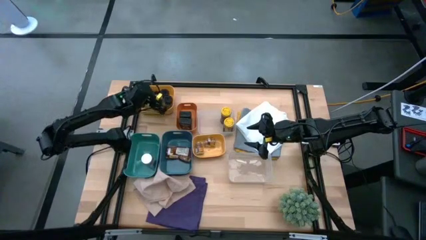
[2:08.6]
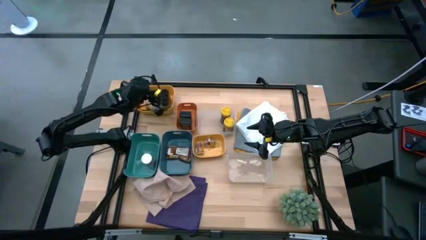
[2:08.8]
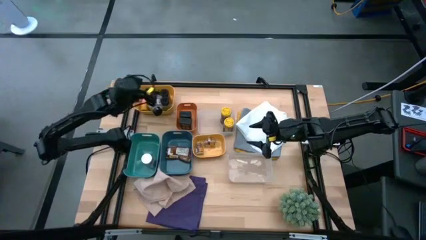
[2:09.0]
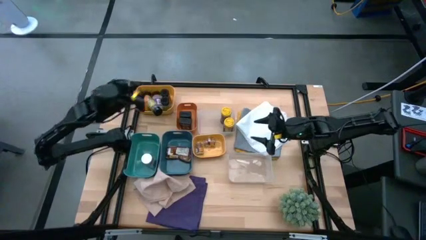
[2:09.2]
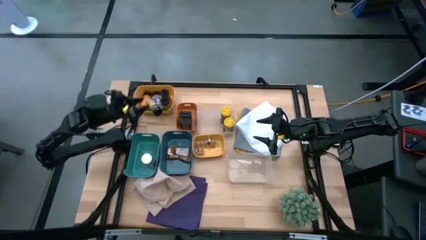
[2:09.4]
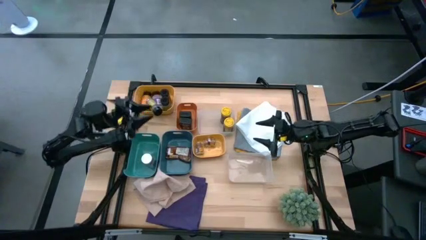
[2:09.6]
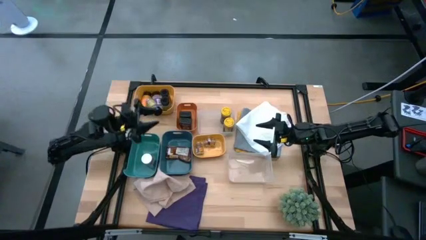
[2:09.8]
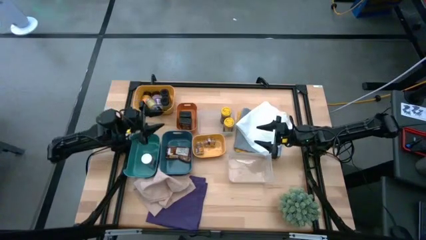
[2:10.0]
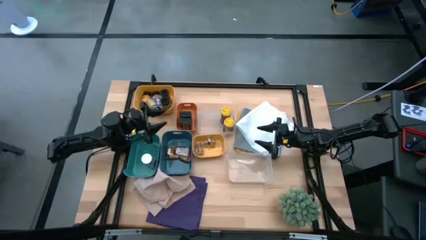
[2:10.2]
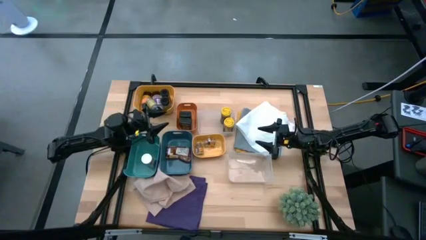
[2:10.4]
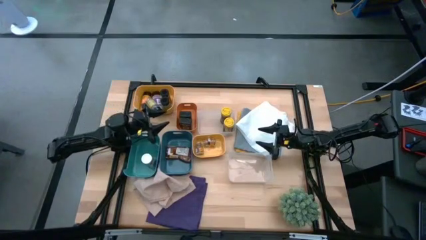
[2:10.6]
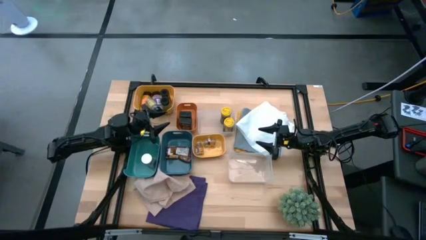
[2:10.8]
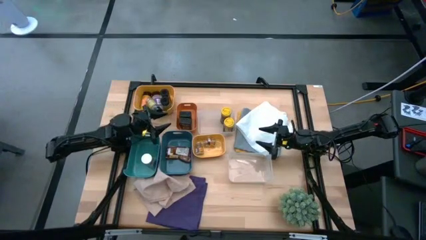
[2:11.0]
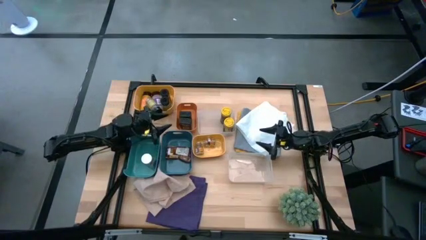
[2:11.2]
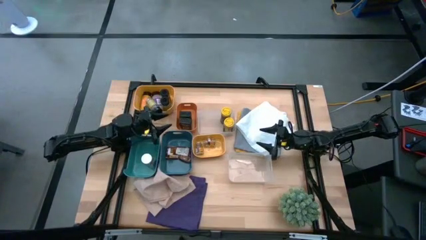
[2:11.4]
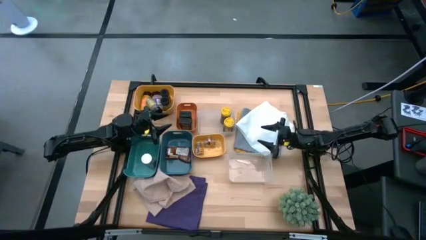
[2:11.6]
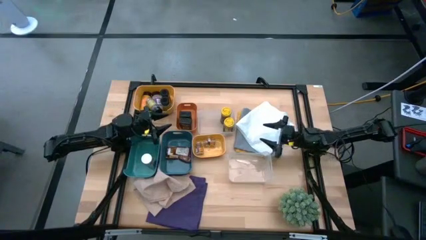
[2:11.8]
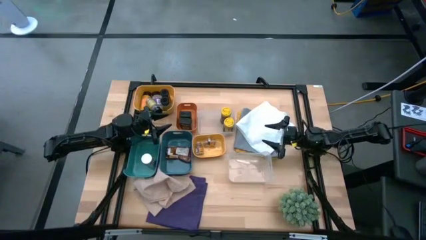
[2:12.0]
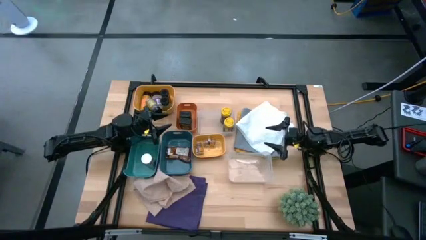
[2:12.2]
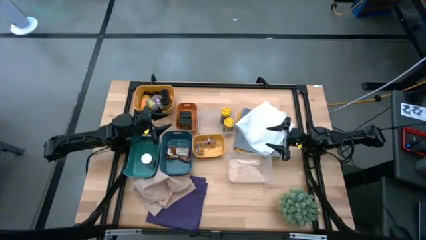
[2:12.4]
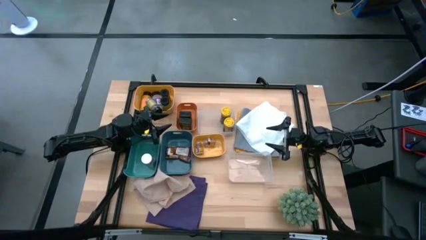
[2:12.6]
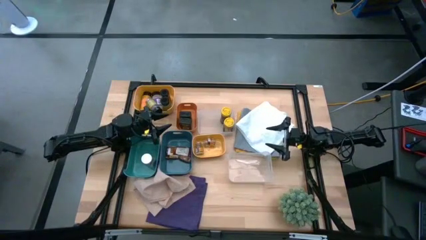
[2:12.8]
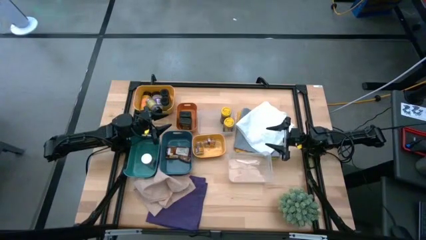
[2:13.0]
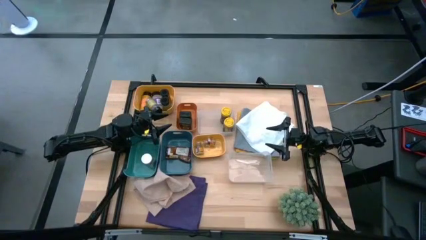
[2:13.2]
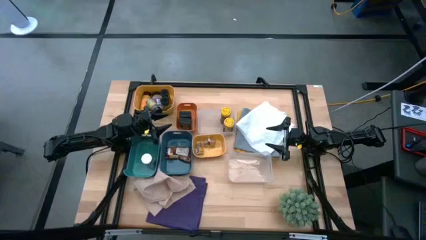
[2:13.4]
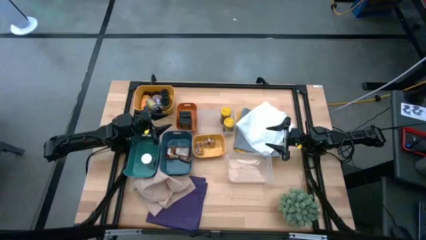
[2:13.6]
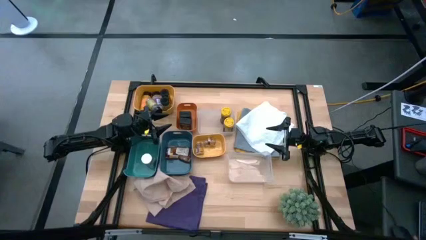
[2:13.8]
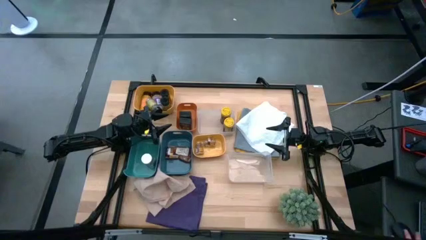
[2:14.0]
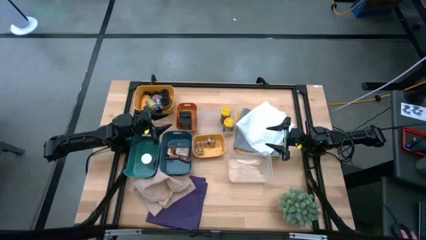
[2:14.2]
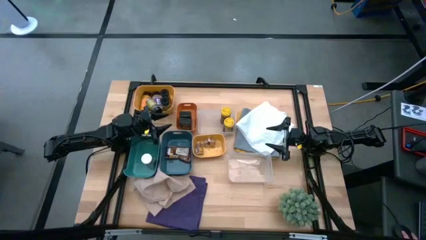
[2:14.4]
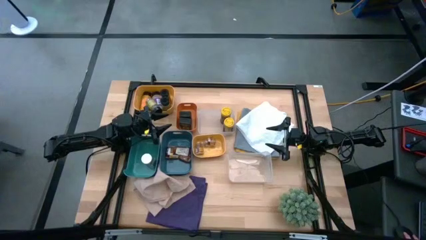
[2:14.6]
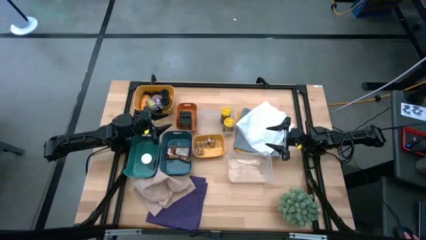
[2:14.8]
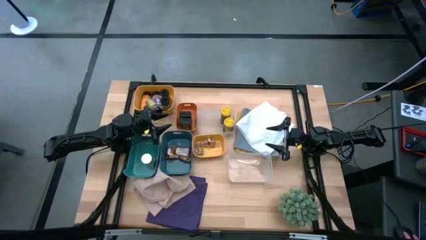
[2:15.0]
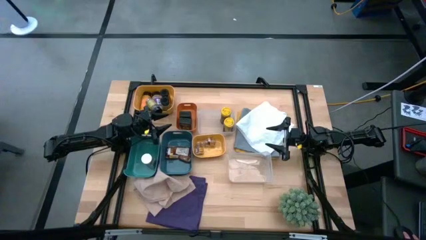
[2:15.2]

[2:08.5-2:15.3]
Task: Sort spices by type
Return to Home Position
